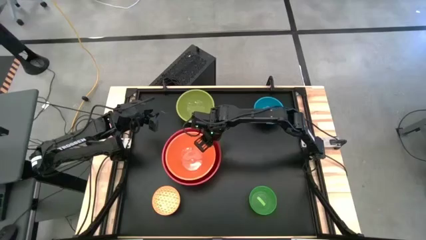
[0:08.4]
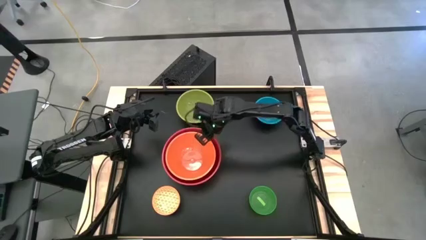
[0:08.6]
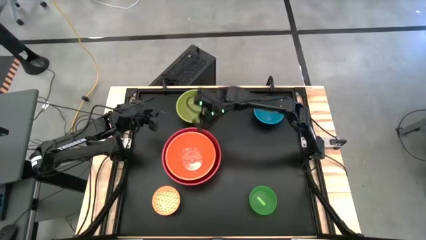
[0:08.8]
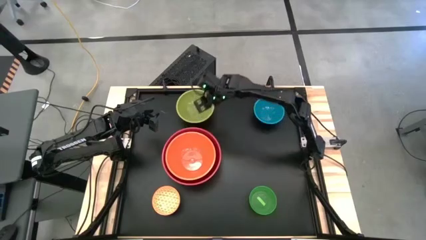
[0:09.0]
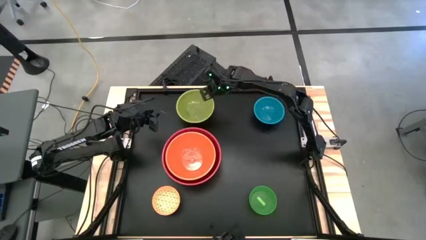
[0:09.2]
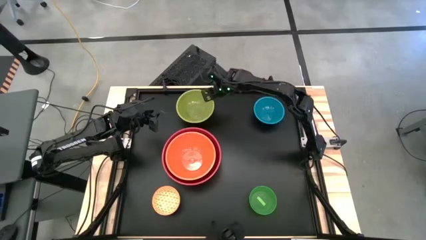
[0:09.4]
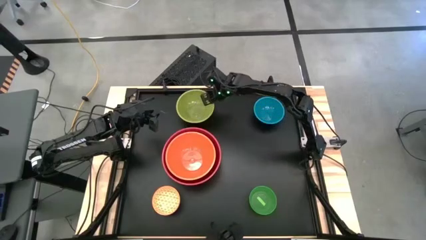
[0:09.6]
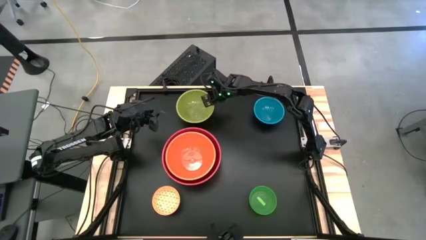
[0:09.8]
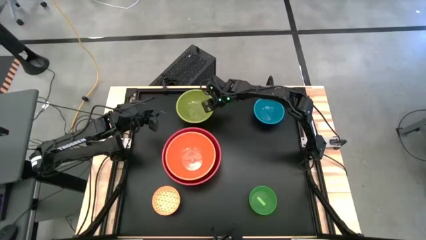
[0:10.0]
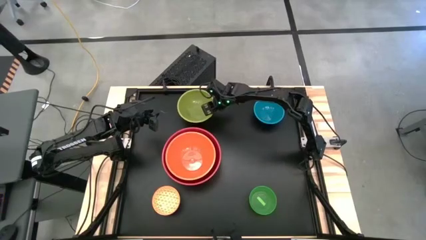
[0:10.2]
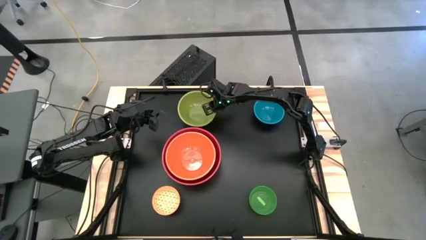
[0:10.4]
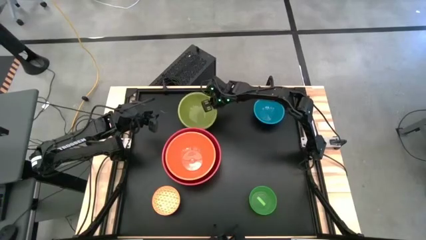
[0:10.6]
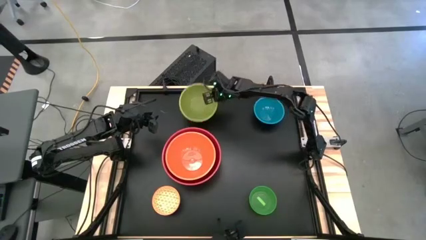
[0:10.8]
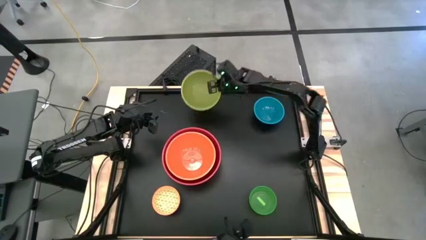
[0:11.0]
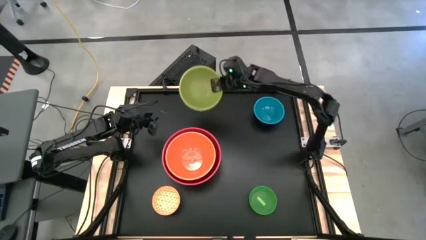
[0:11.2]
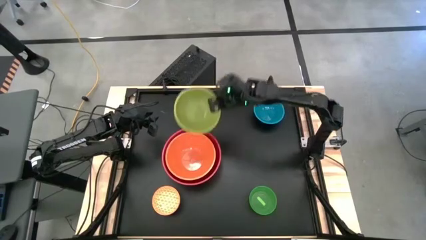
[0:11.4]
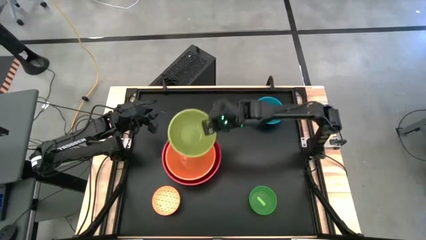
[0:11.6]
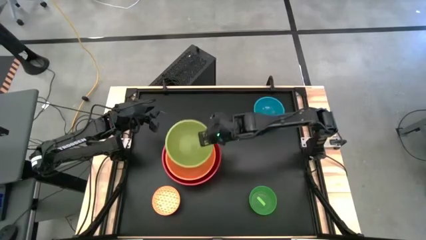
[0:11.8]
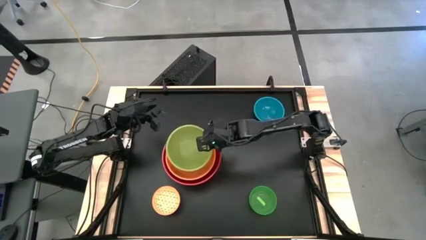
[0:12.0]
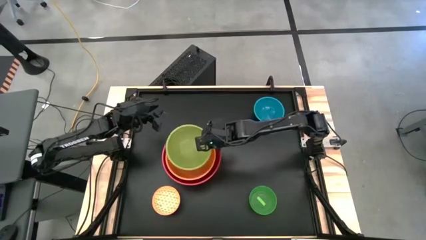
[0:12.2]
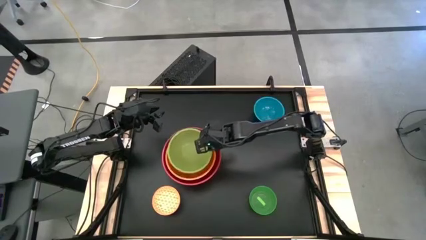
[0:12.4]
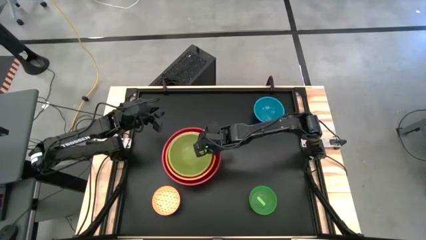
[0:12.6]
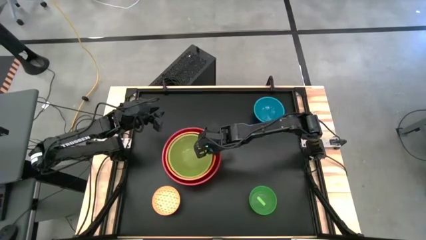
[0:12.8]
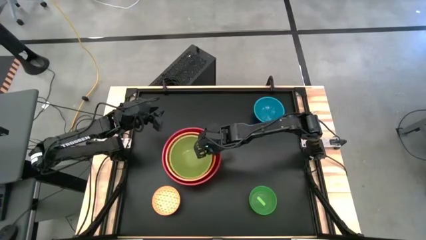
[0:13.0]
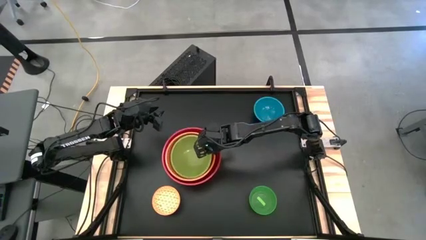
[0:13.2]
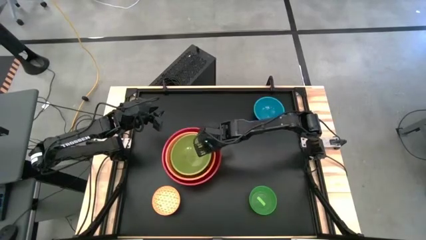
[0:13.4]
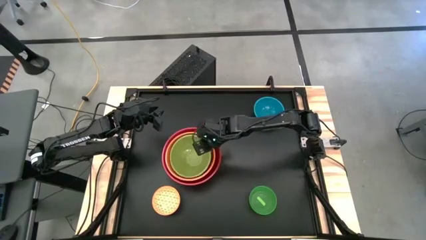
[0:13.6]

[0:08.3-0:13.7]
Stack the light green bowl on top of the orange bowl

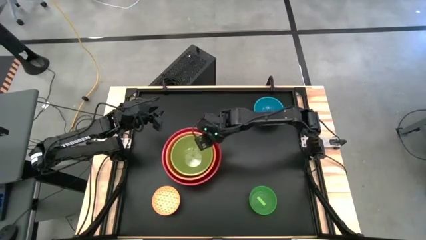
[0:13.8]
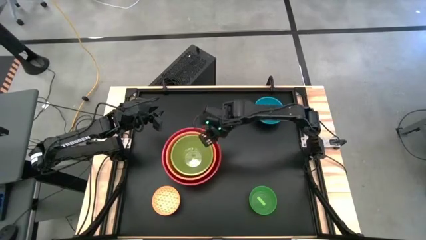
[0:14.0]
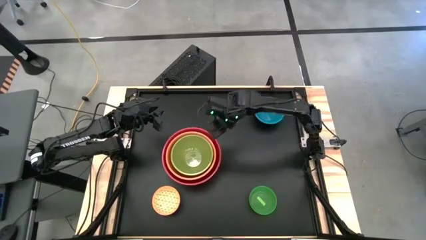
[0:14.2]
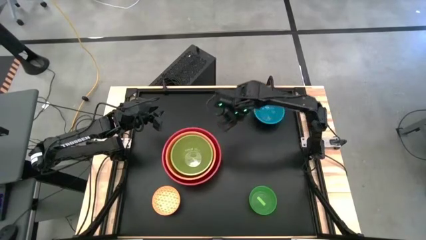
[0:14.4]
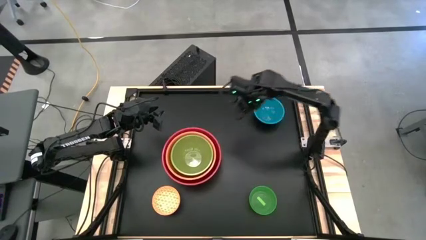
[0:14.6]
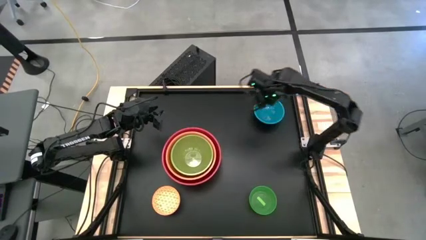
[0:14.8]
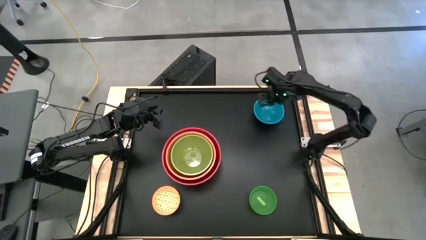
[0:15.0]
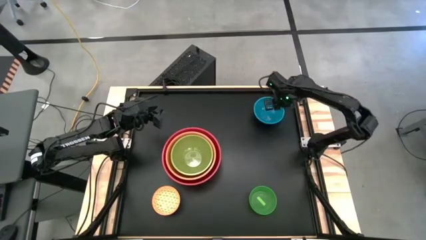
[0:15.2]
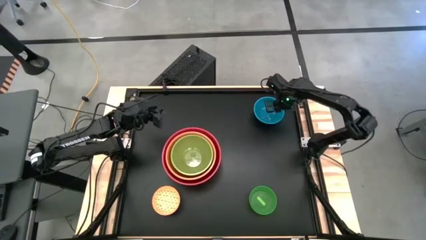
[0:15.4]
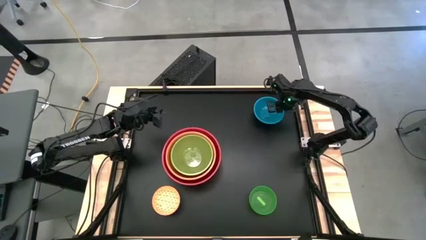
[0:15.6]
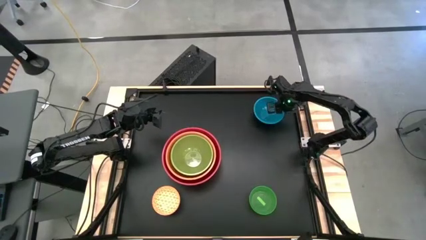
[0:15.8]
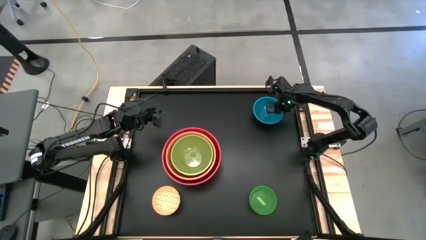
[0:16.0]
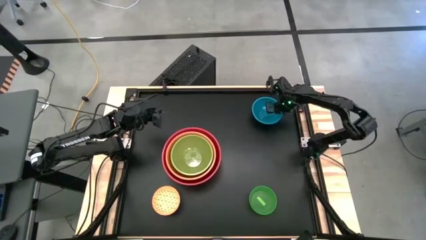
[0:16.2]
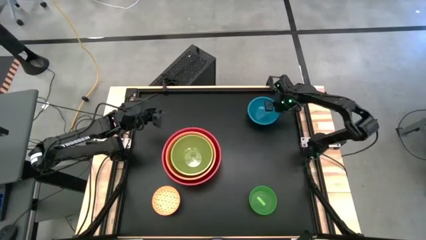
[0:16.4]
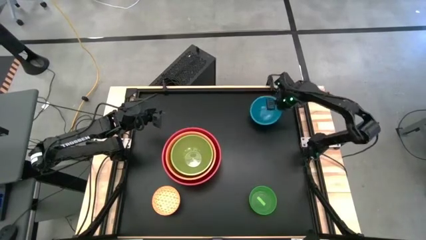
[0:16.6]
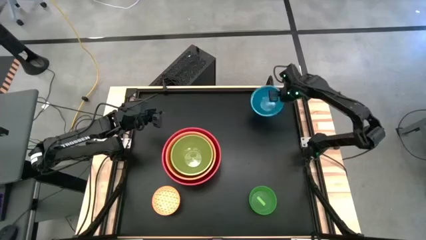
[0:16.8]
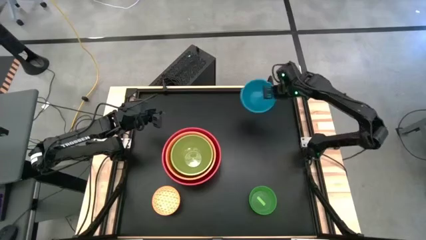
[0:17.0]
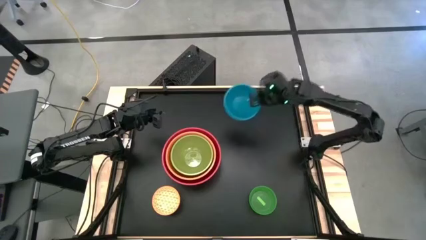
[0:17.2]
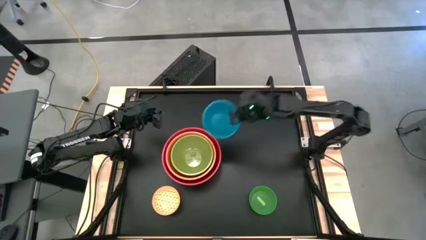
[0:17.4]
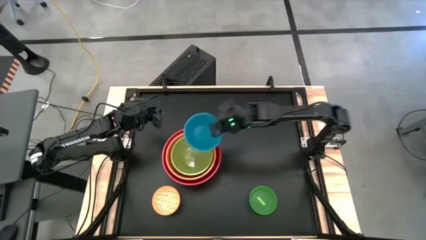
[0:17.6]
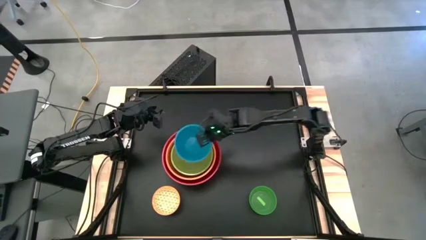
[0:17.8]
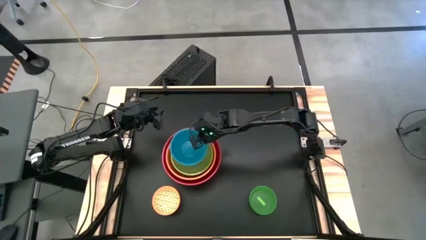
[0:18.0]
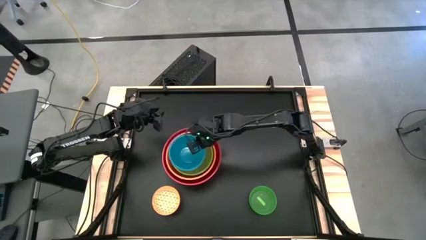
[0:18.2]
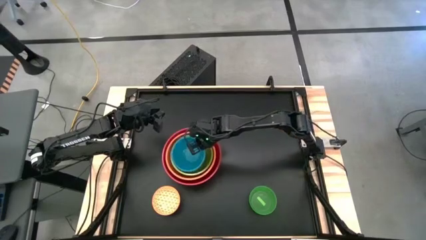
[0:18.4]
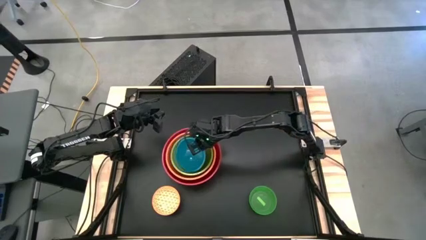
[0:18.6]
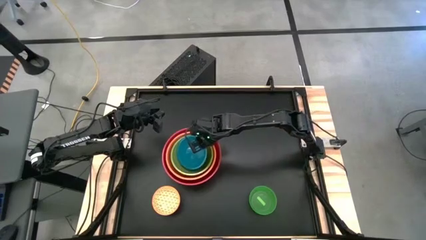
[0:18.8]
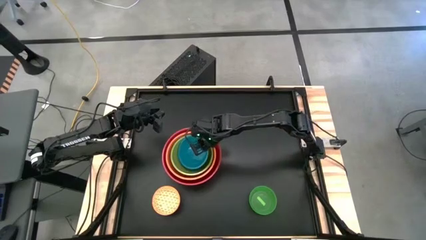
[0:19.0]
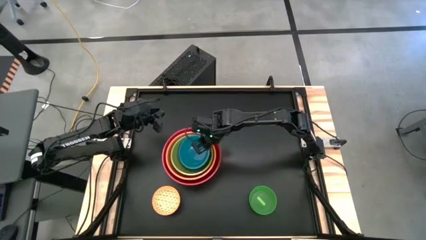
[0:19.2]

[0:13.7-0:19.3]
Stack the blue bowl on top of the light green bowl

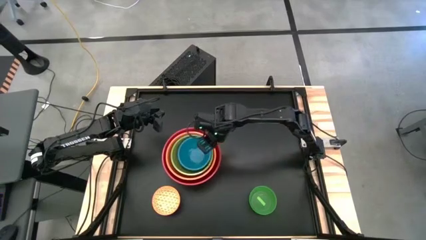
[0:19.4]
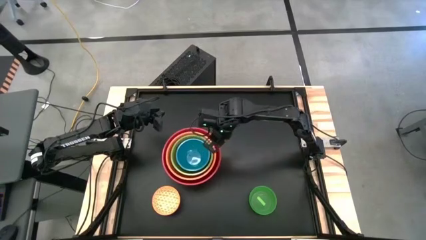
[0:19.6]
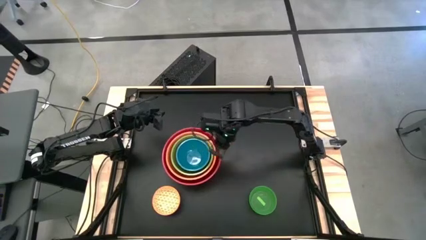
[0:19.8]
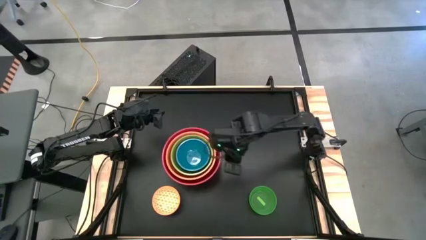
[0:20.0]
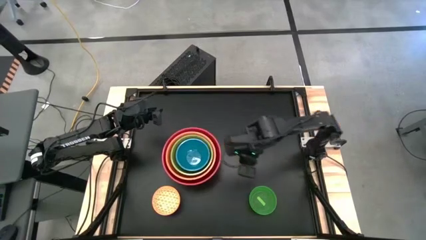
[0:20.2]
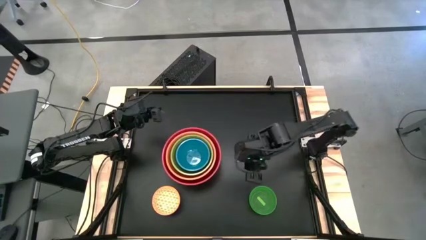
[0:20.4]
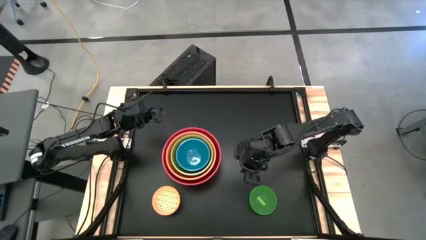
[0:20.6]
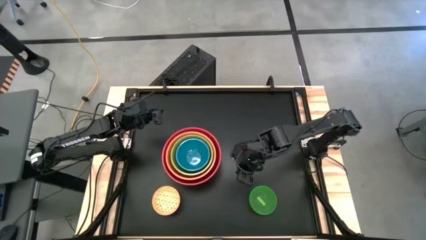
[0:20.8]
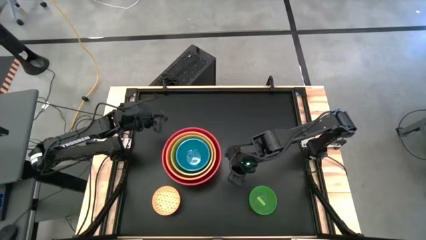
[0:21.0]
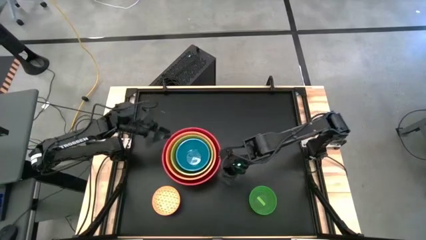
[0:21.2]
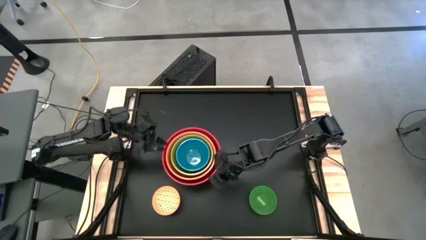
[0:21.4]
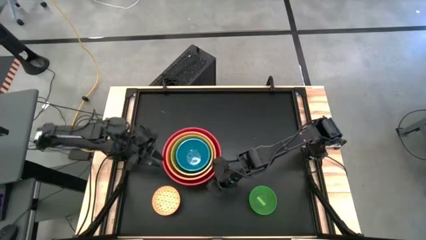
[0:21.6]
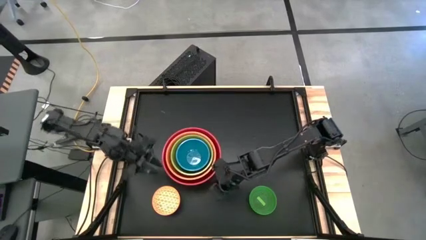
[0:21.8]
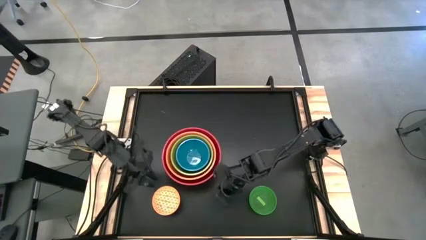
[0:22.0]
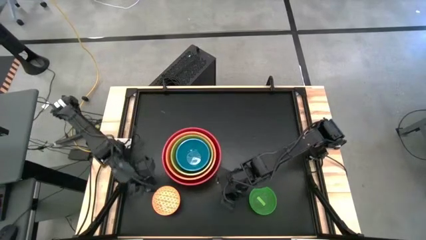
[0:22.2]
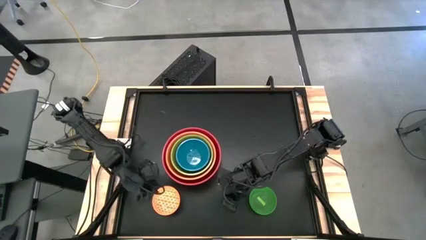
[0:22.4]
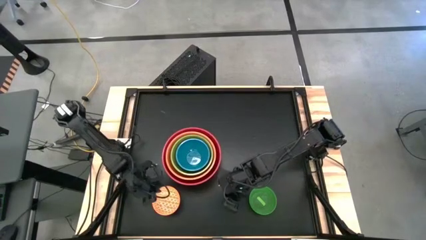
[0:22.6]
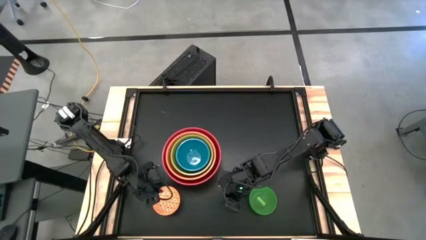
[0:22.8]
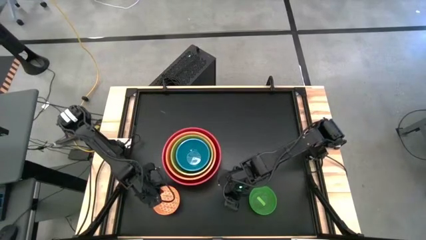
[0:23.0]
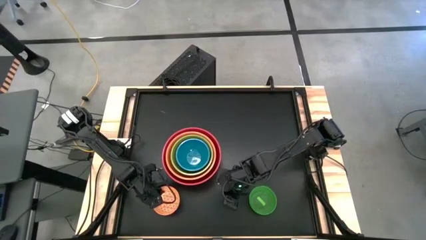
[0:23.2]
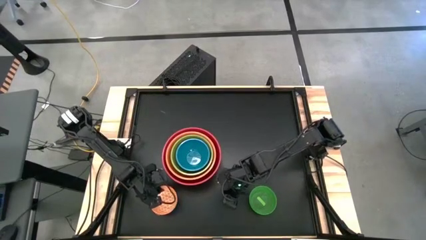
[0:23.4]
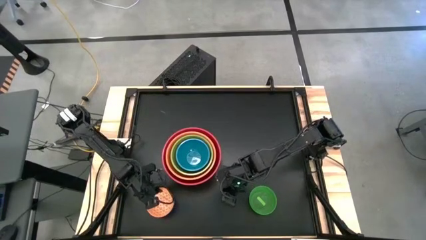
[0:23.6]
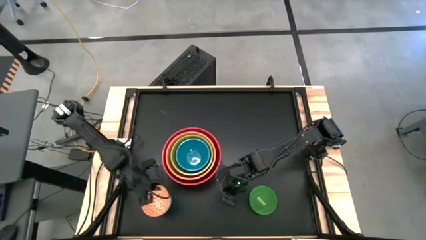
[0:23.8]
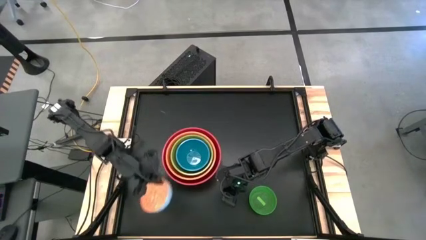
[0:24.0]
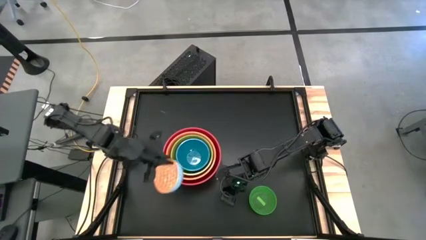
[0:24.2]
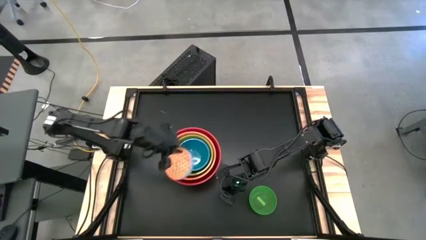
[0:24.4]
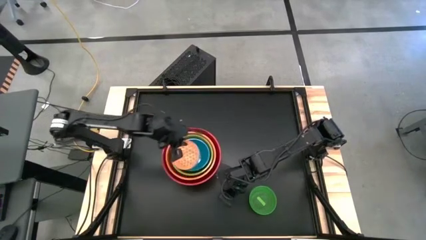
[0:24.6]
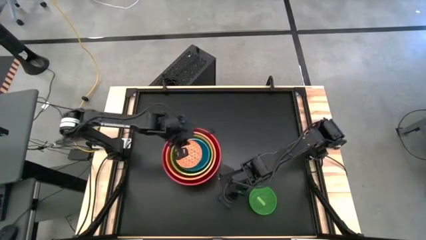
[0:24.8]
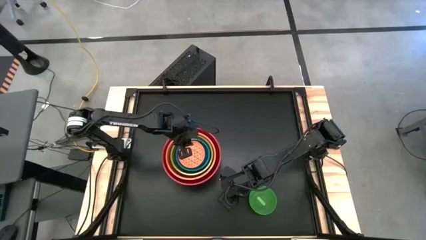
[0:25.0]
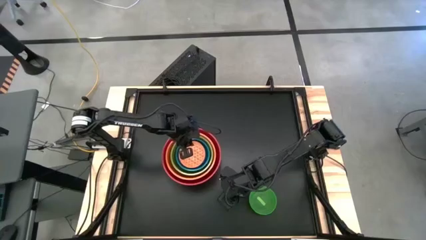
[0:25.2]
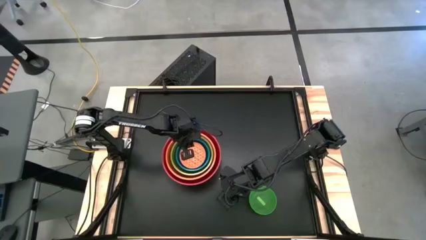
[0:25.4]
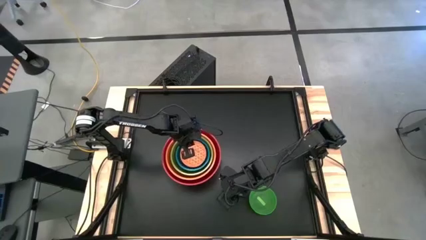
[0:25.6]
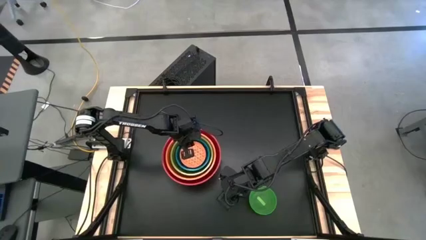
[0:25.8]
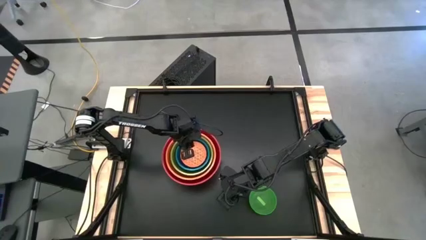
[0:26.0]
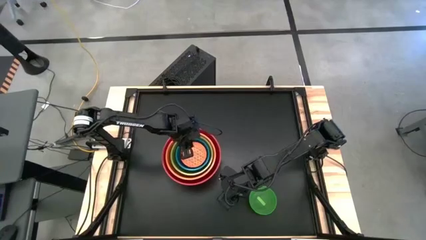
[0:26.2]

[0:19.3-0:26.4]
Stack the orange patterned bowl on top of the light blue bowl
